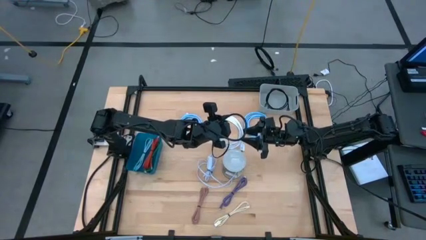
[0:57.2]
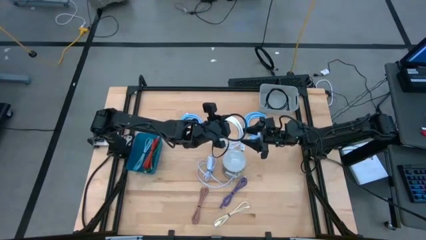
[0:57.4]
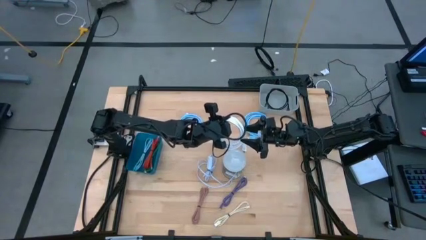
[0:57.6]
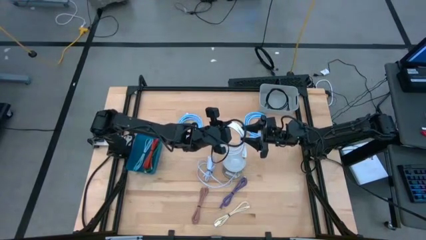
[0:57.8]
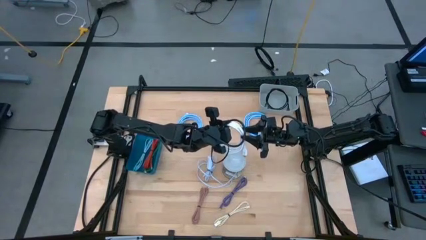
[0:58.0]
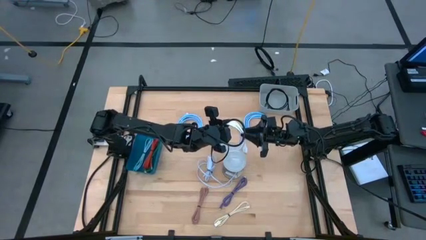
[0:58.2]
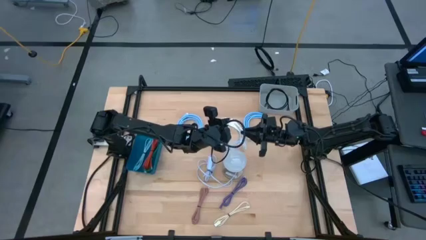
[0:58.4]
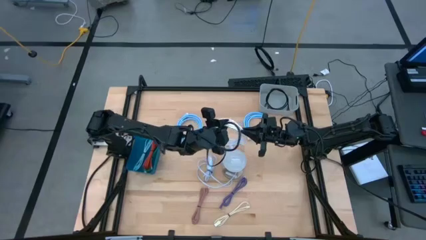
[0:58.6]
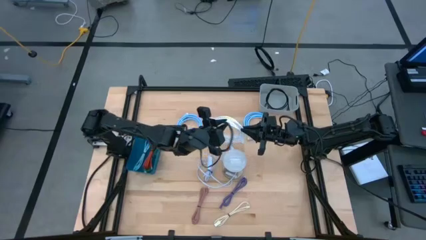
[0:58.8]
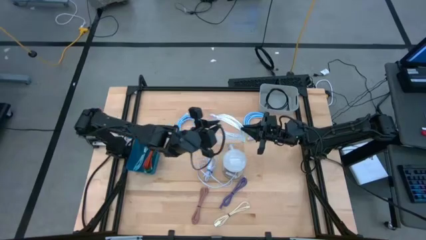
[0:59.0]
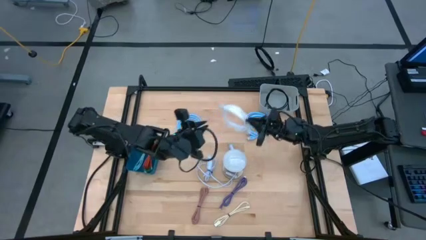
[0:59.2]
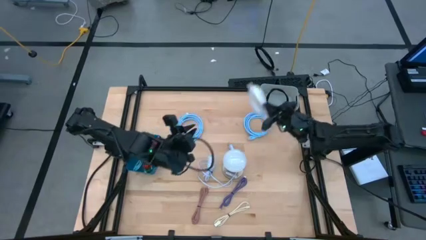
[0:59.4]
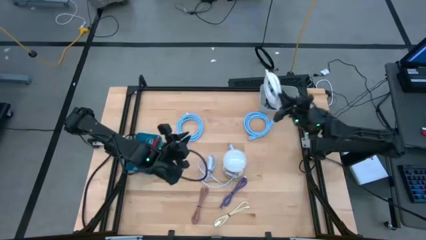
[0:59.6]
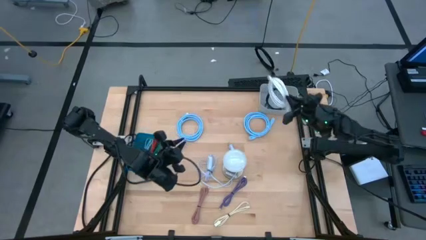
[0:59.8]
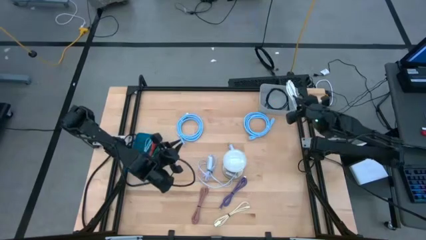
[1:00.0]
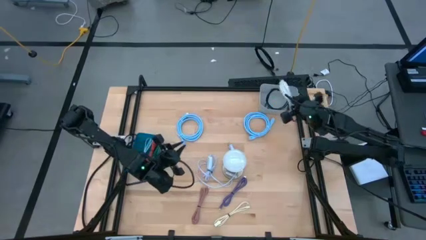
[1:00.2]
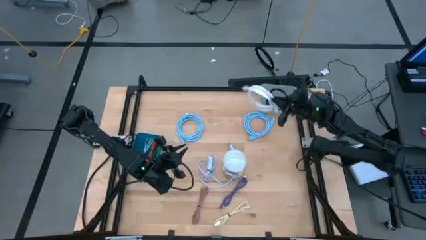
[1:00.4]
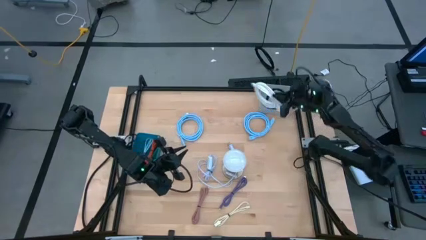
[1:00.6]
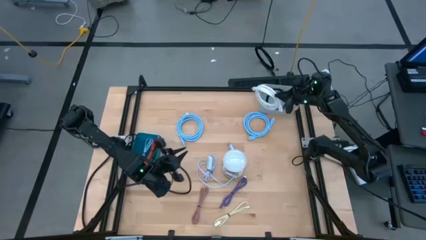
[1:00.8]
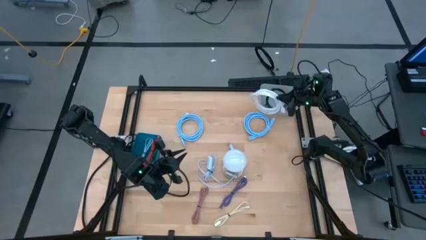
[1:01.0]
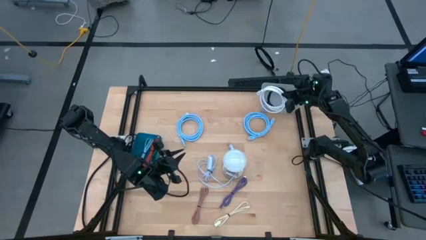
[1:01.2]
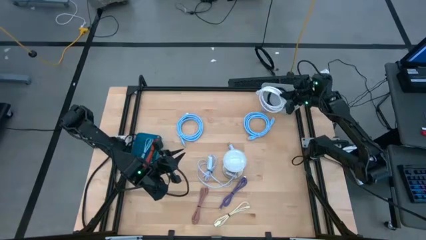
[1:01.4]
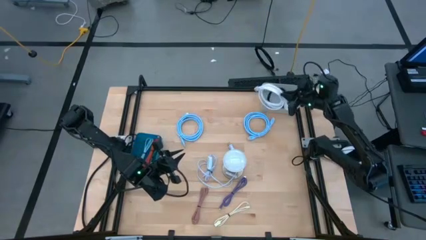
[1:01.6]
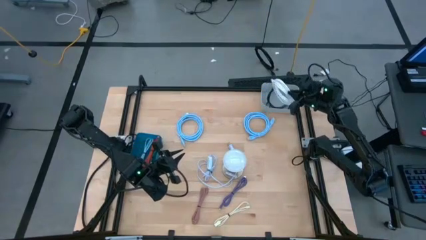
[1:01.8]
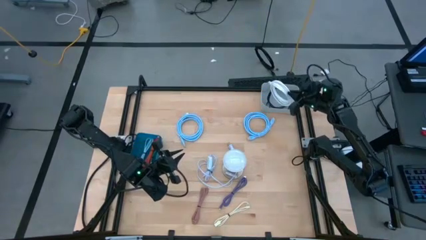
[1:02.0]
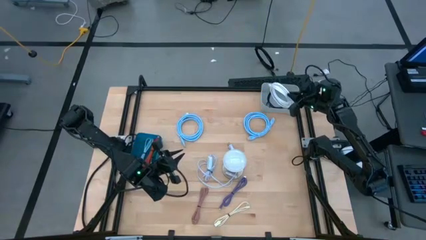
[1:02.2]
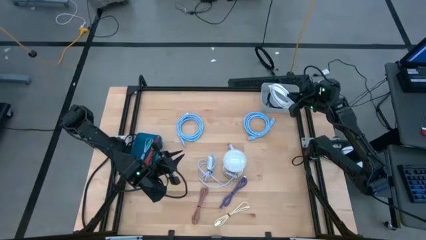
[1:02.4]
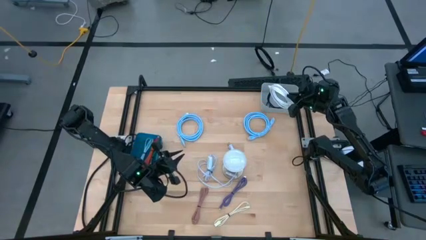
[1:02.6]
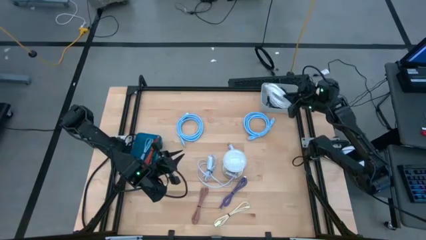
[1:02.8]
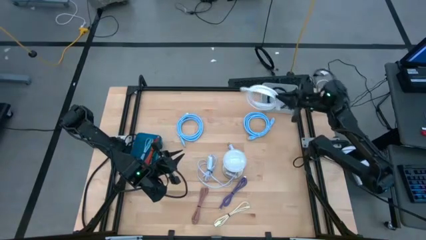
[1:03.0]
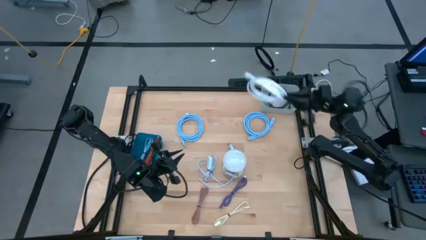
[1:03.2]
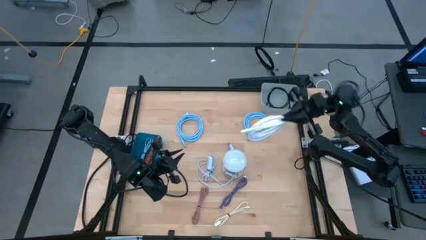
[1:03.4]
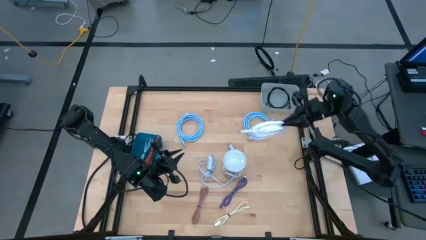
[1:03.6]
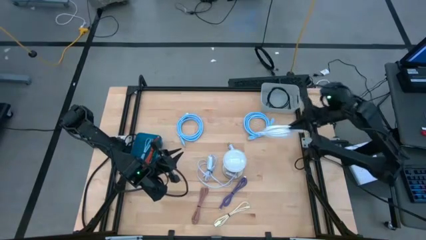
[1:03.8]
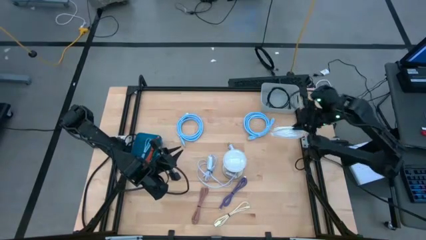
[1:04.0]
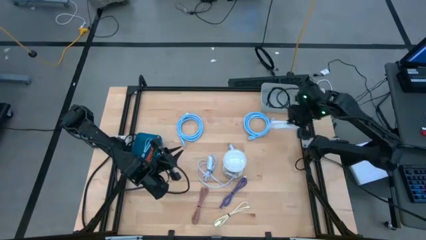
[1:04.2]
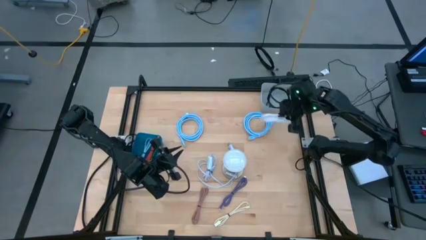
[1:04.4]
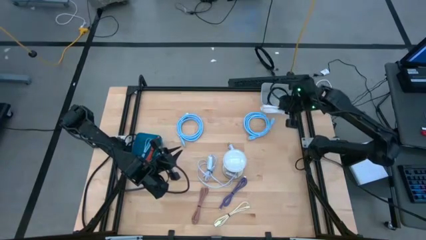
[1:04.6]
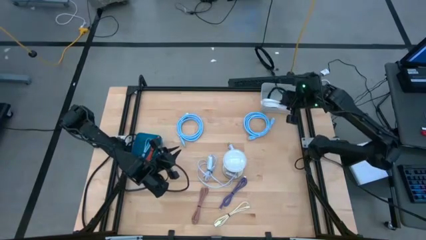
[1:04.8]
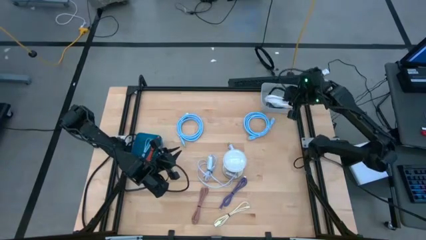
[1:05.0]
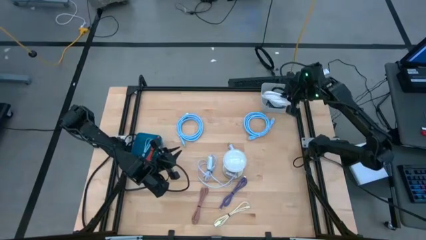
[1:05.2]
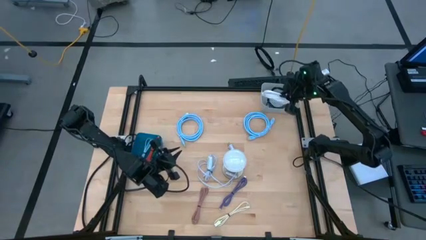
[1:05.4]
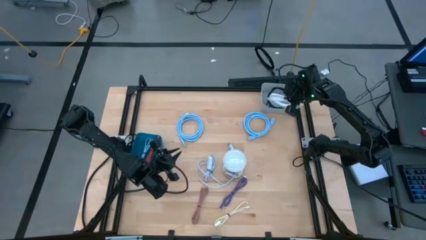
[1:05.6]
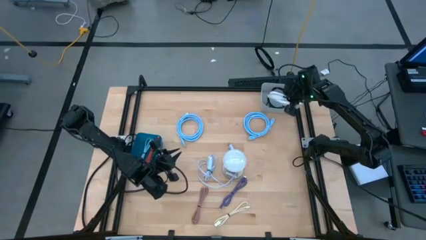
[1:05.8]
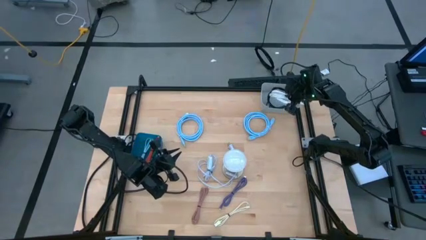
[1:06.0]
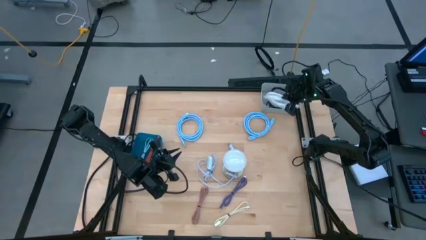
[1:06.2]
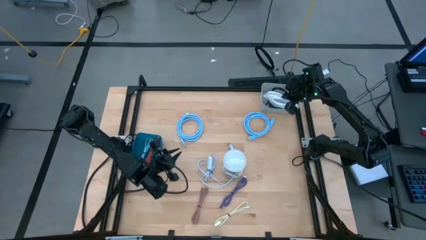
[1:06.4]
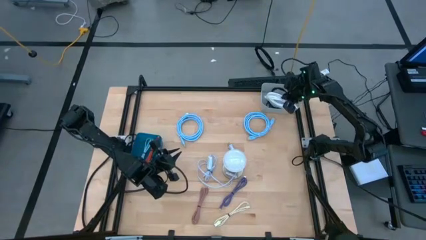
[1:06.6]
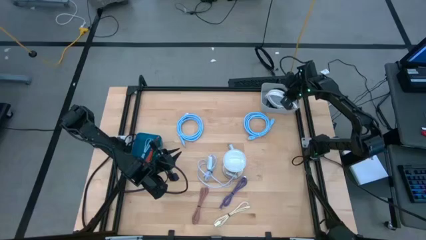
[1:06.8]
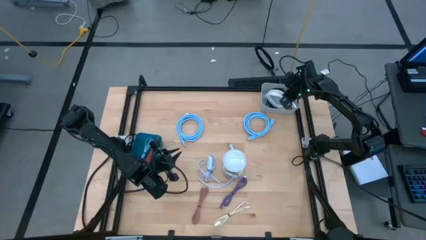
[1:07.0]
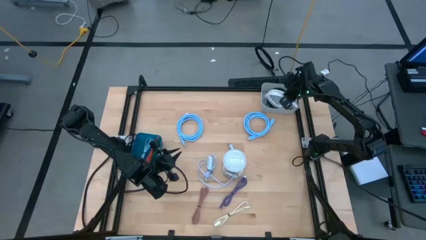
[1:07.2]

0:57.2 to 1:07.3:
Task: Pick & Place USB Port
Put the white HDMI cable into the gray bin

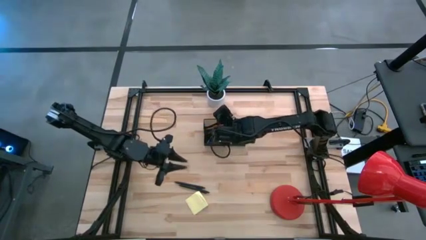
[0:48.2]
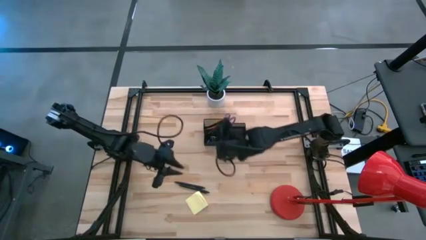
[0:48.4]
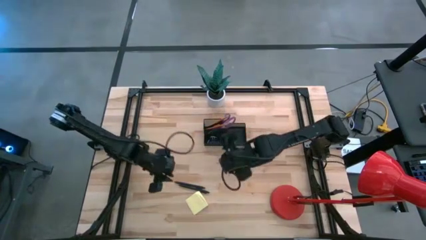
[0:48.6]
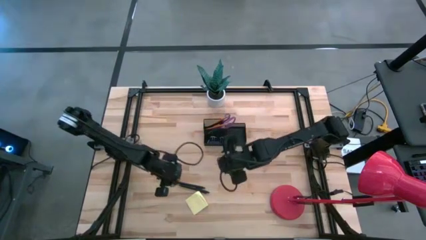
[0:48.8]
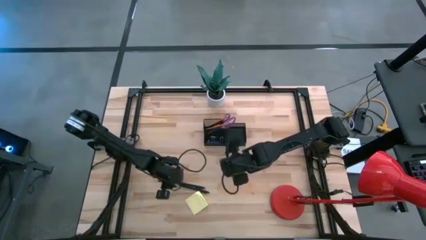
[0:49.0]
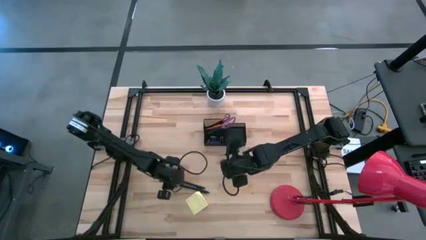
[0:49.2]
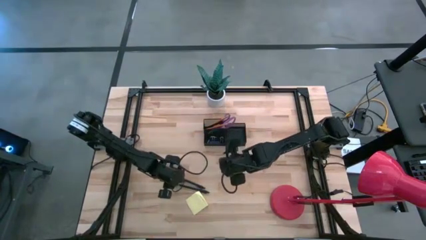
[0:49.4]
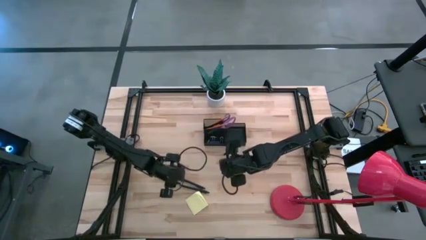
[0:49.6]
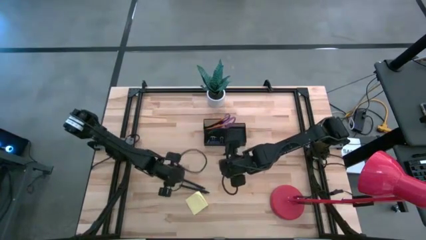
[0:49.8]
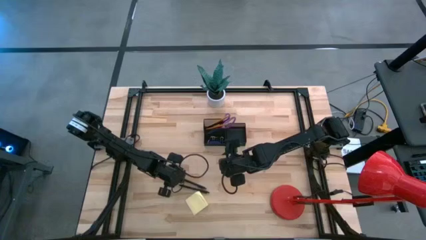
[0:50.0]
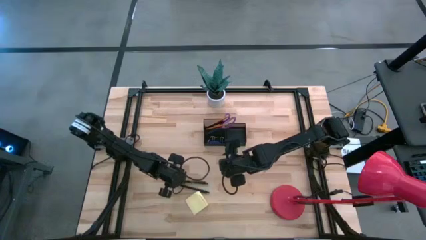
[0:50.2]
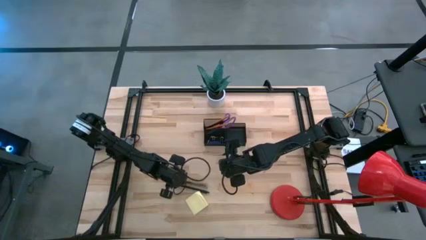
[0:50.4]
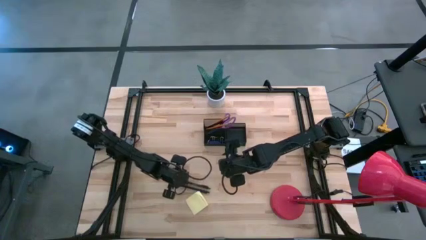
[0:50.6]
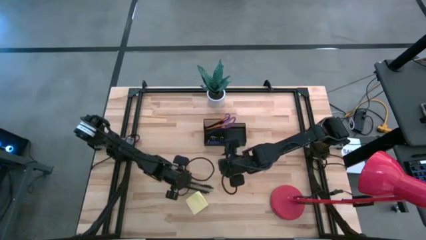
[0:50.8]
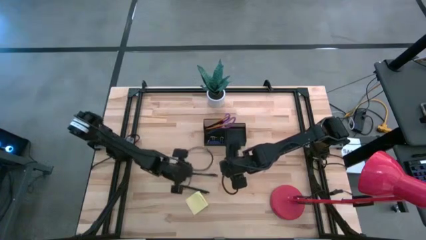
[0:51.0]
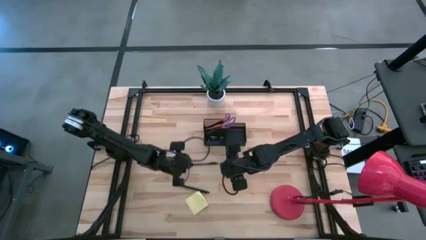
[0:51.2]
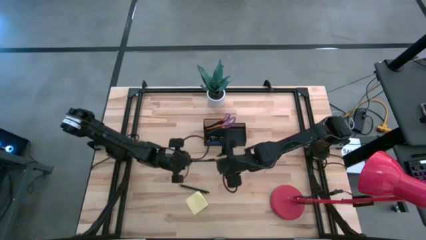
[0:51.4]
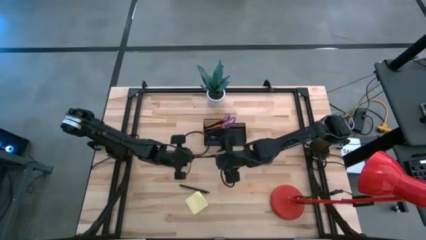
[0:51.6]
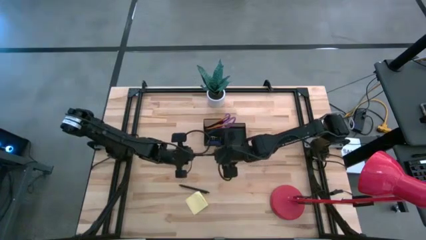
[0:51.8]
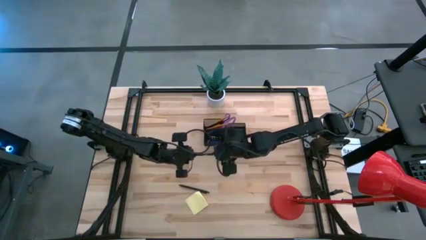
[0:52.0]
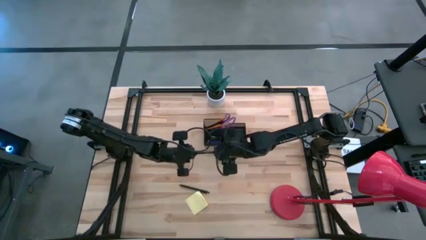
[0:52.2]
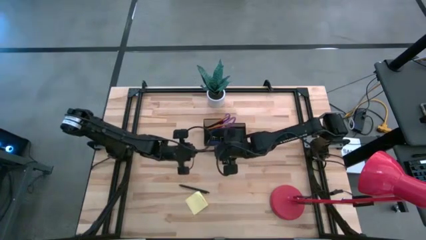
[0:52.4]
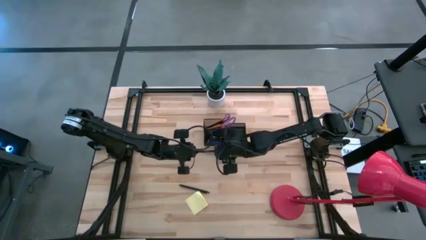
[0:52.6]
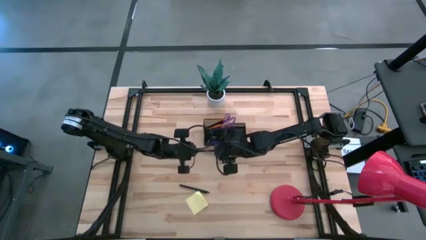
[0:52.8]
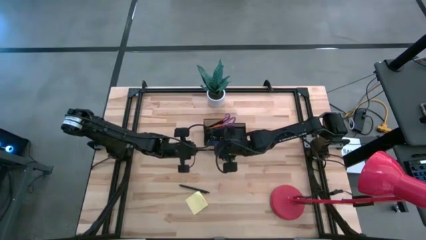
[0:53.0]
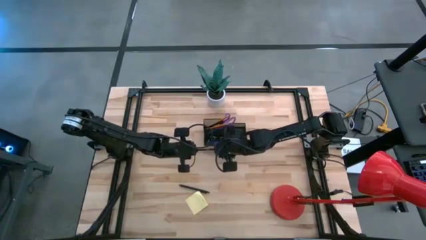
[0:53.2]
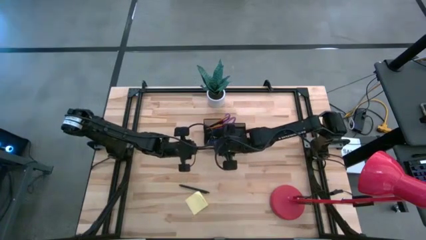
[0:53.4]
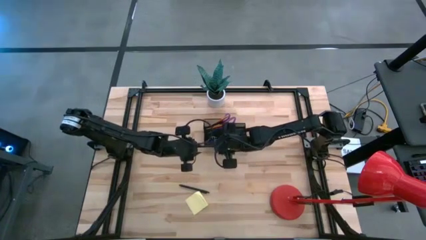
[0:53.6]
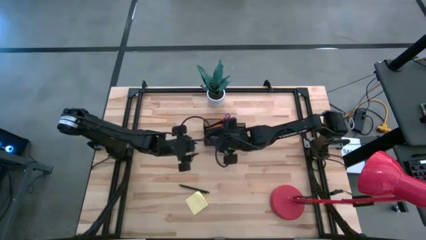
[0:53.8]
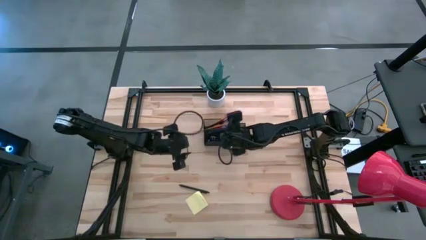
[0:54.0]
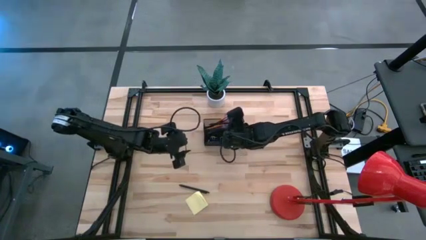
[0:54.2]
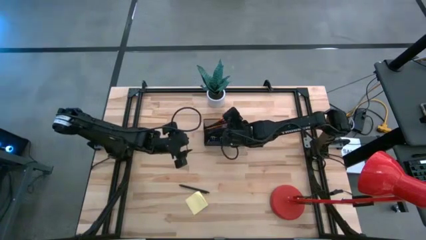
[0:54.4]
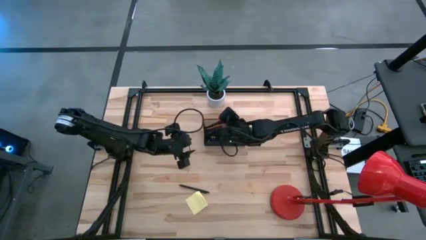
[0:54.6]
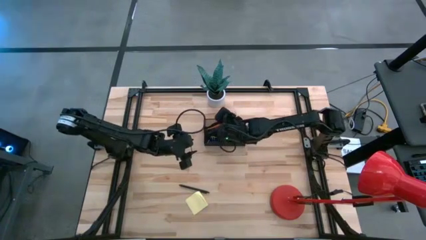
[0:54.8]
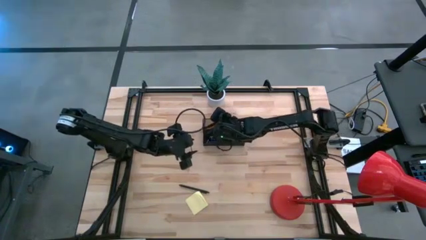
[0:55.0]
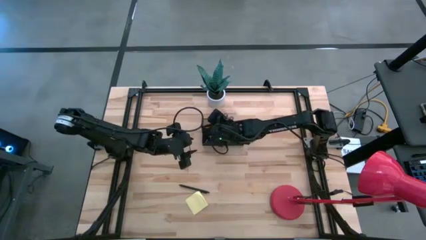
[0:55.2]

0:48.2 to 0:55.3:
Task: Pick and place office supplies into organizer
Put the top black pen into the black organizer

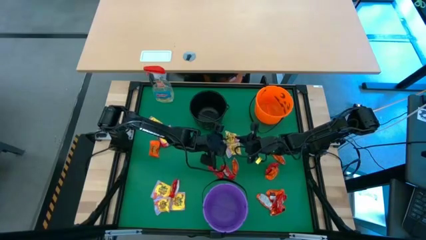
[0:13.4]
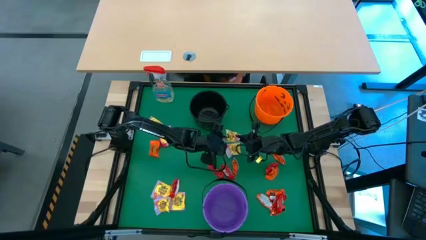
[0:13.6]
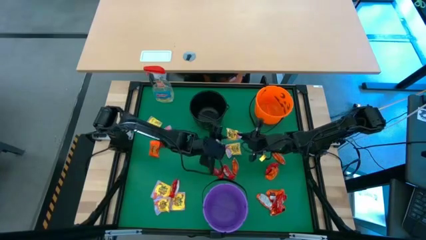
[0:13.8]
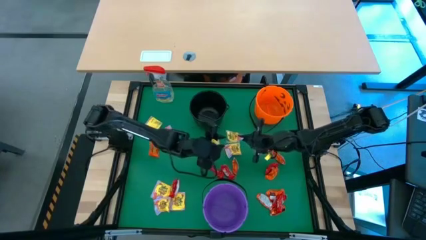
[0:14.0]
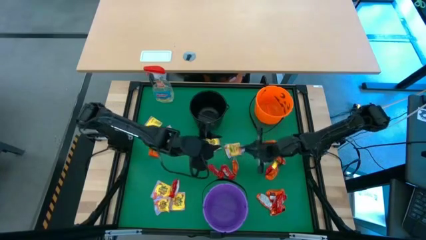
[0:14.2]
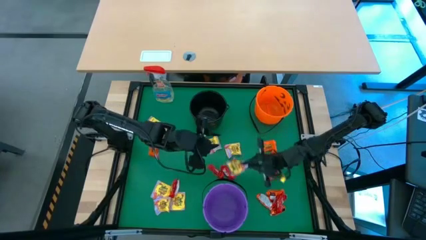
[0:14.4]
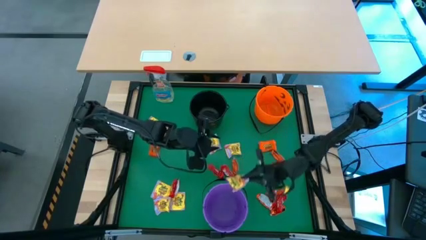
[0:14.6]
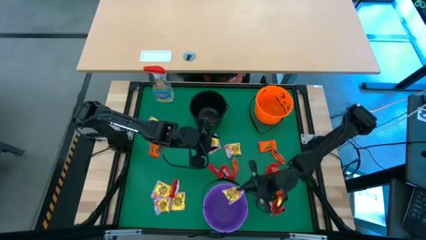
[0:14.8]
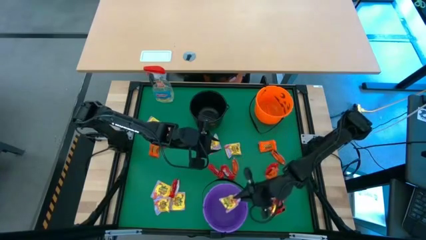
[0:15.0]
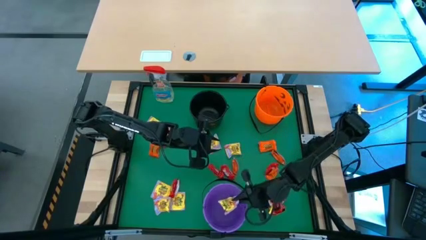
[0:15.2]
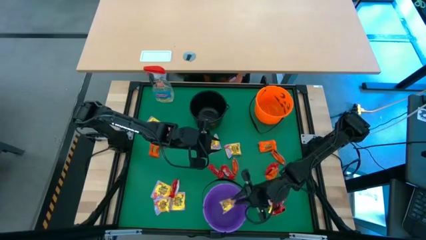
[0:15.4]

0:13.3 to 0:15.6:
Task: Sort candy
Put the yellow candy into the violet bucket
